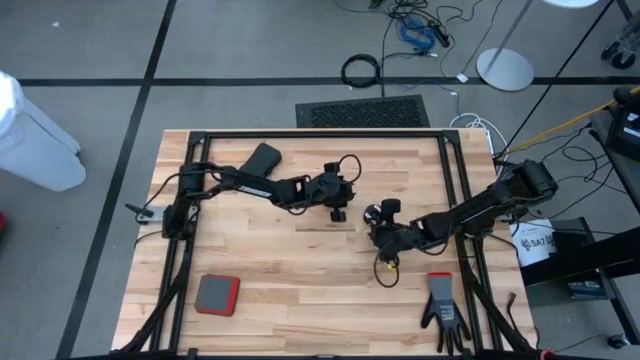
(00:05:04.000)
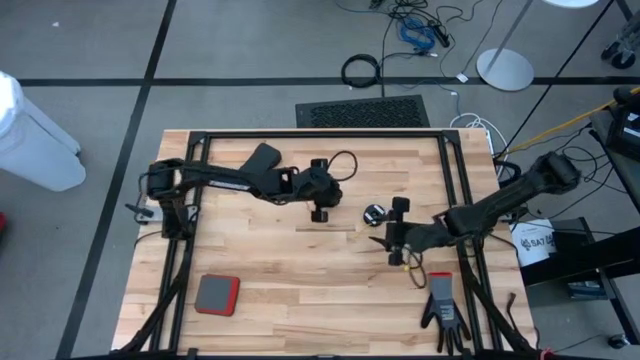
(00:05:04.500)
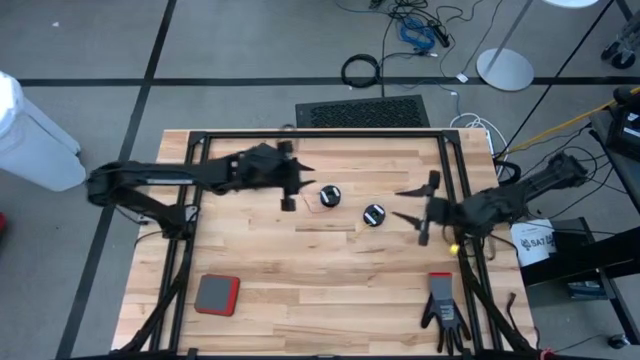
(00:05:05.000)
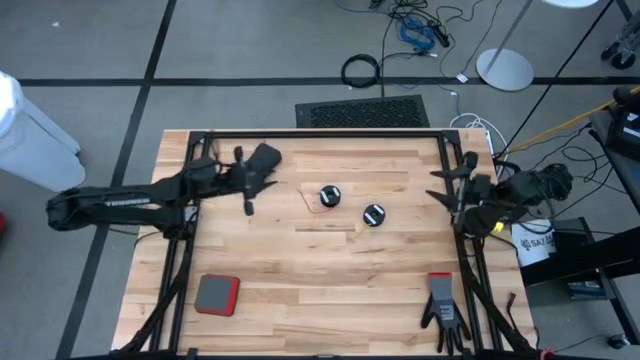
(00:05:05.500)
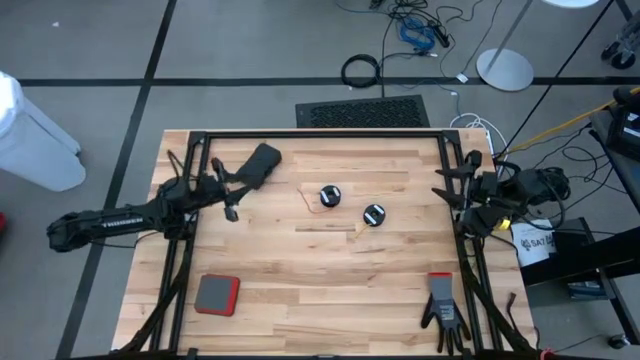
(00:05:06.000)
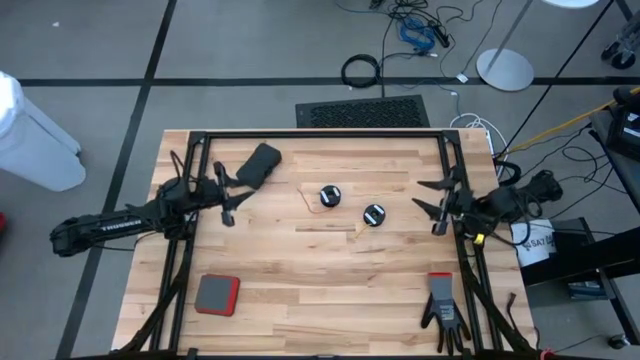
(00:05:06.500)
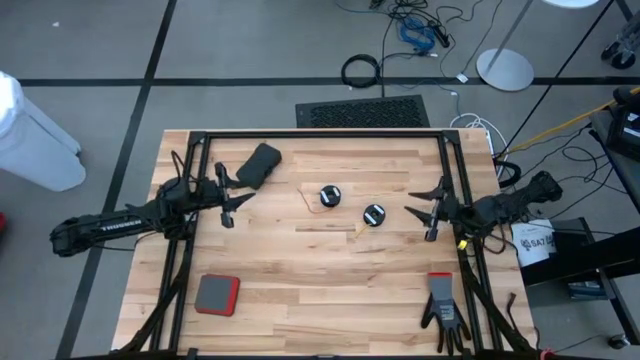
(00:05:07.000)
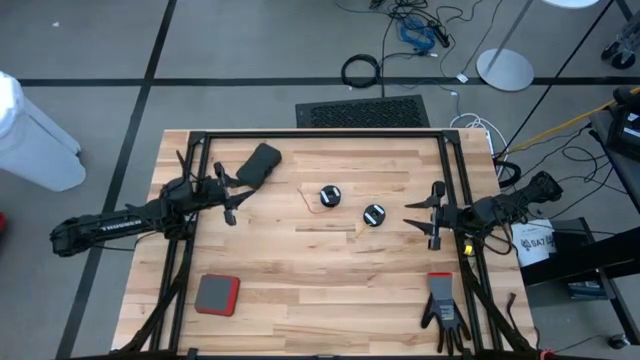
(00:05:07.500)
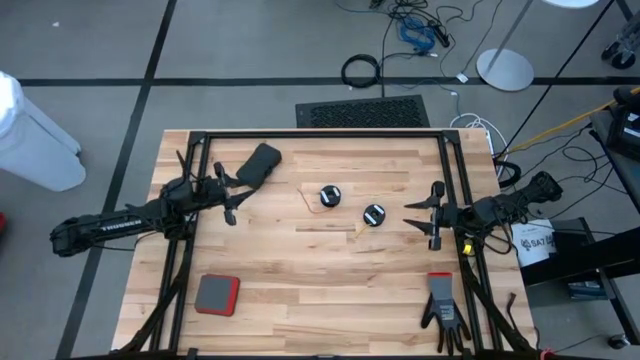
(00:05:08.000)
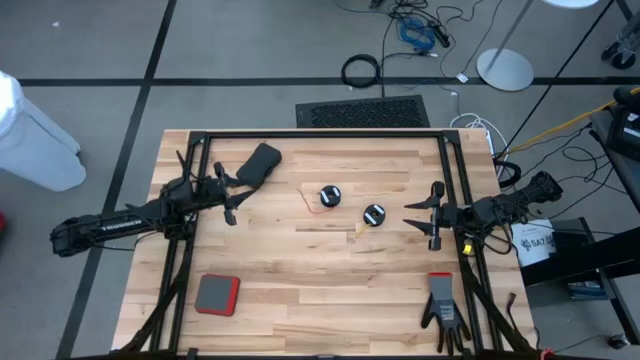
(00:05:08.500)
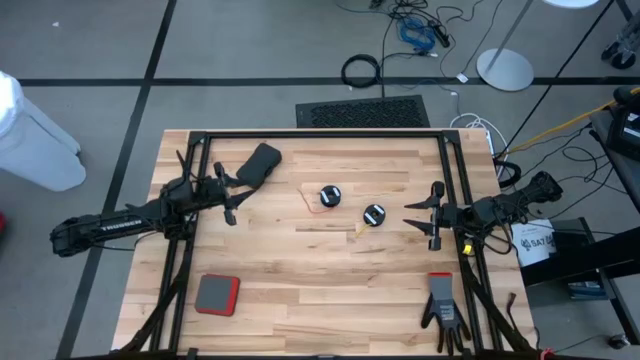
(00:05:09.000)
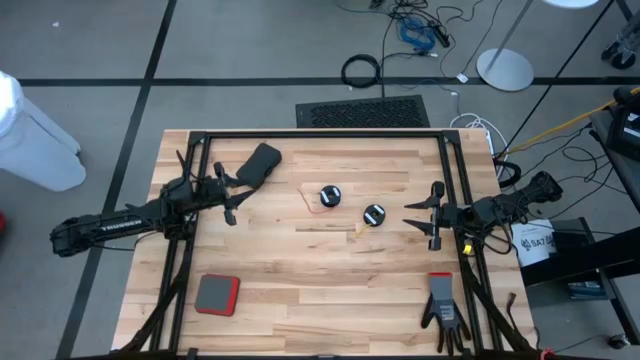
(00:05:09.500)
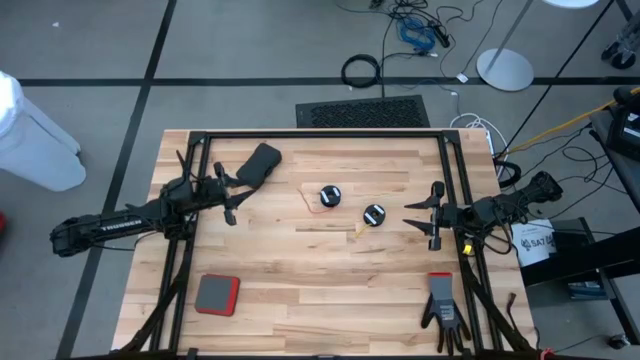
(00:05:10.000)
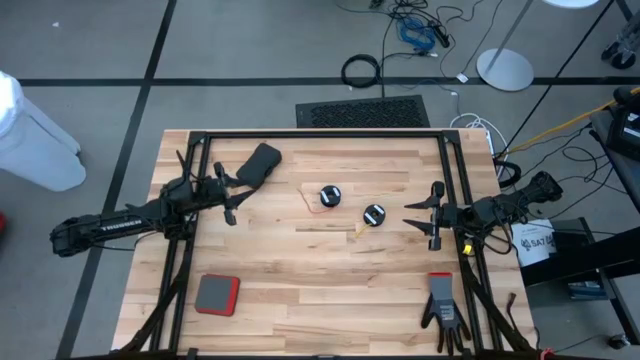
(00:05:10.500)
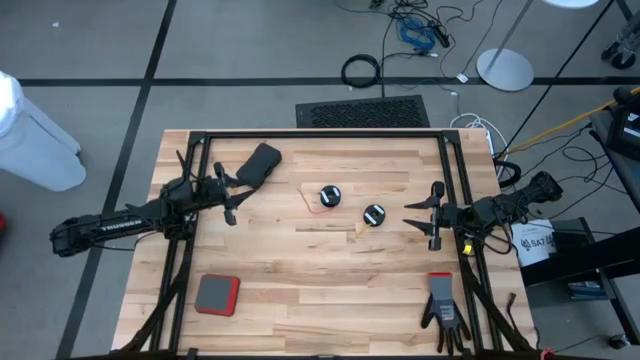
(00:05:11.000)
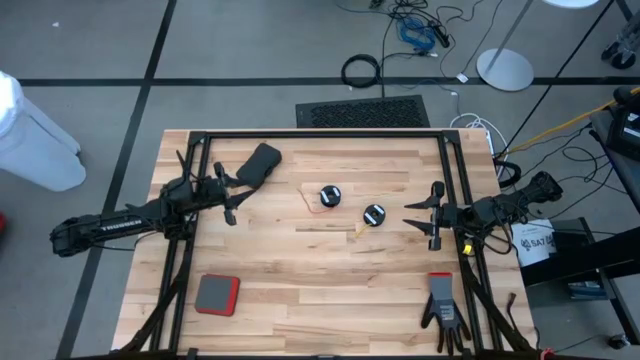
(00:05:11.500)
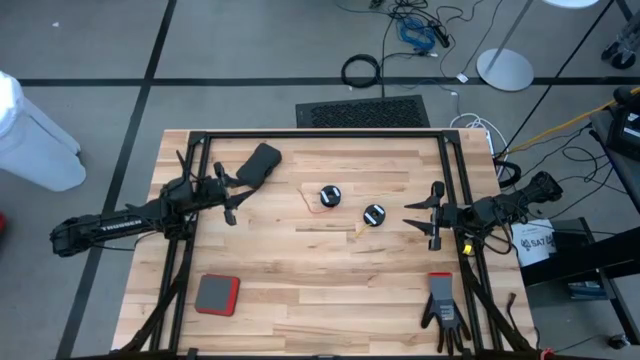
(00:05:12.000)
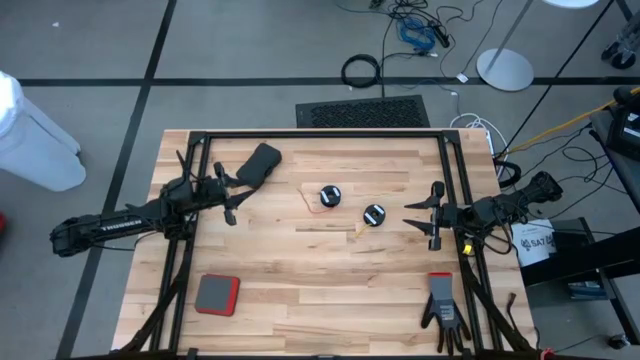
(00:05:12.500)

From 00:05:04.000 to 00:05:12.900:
Task: Coil cords
Return to Home Position

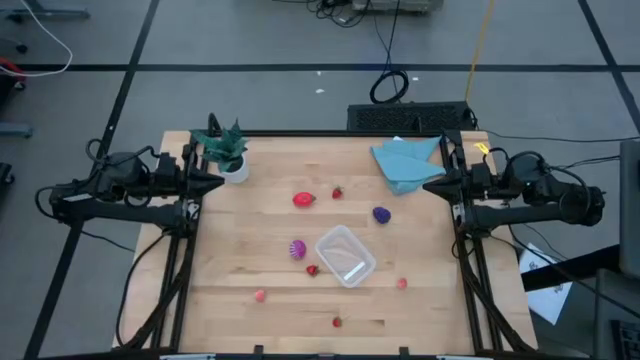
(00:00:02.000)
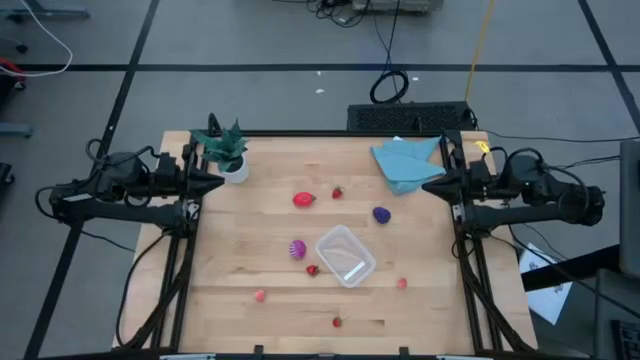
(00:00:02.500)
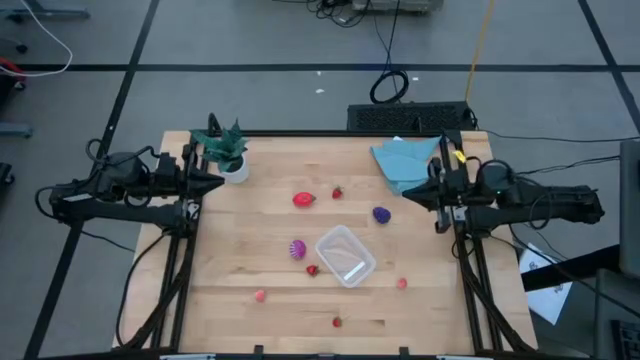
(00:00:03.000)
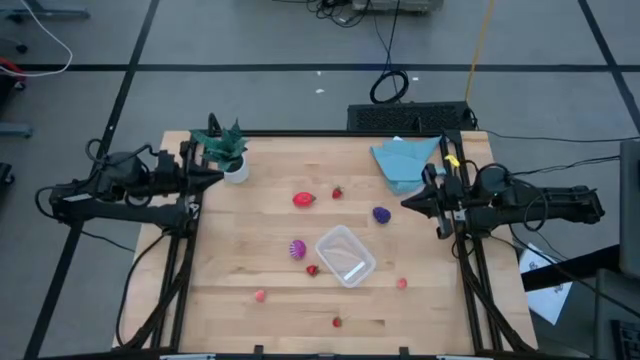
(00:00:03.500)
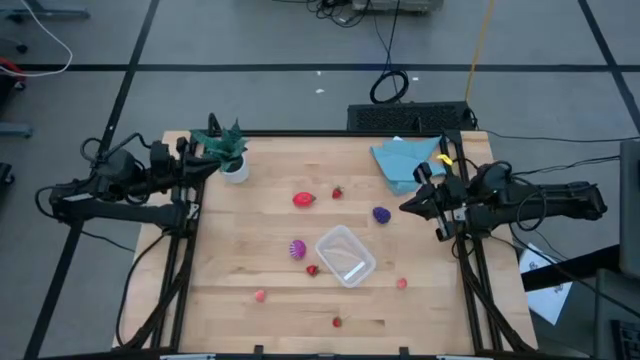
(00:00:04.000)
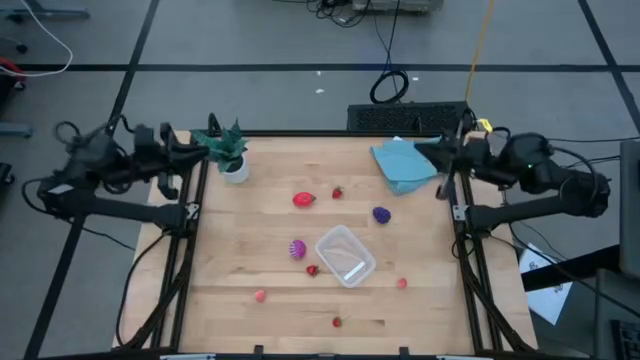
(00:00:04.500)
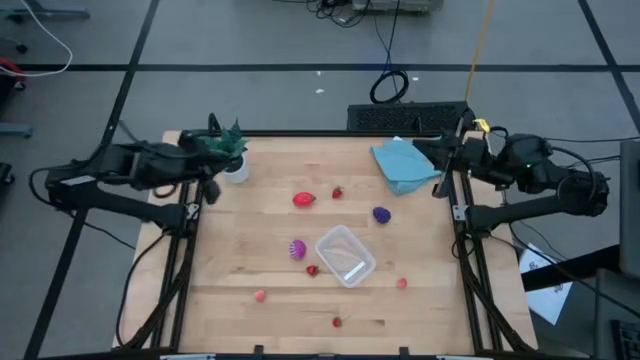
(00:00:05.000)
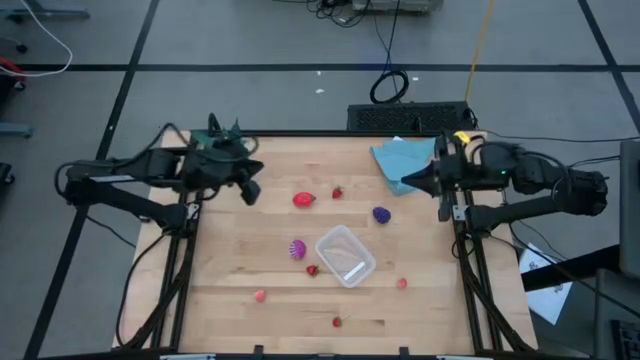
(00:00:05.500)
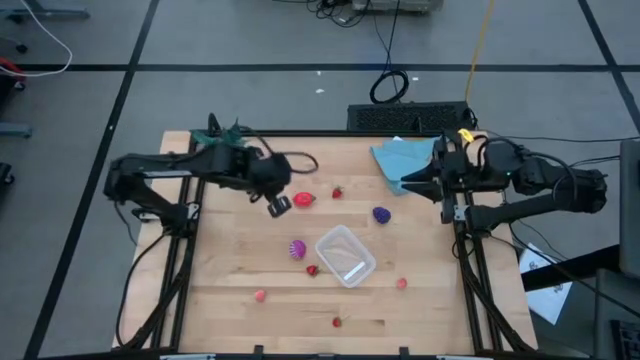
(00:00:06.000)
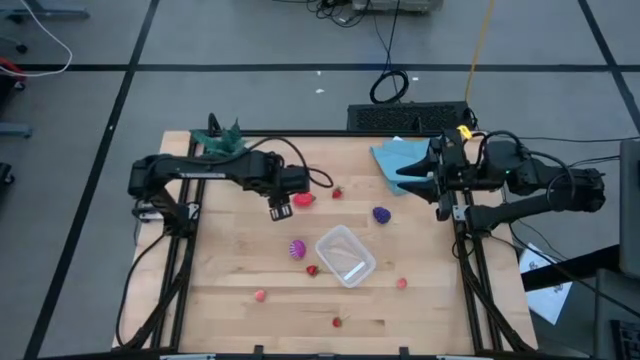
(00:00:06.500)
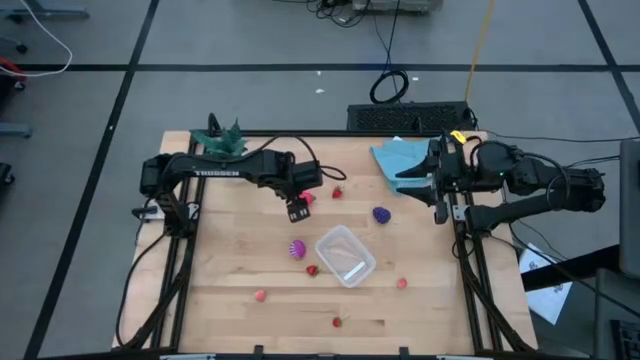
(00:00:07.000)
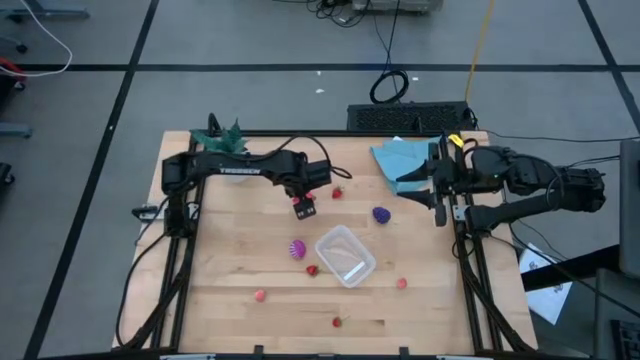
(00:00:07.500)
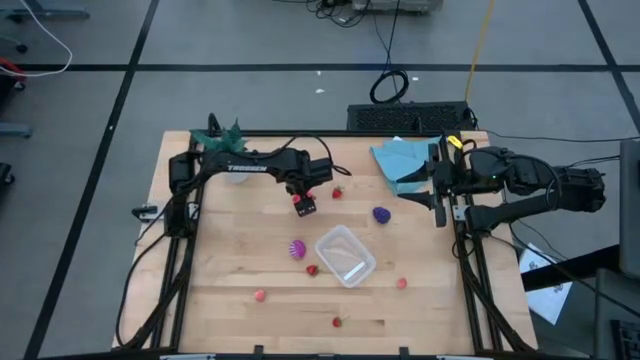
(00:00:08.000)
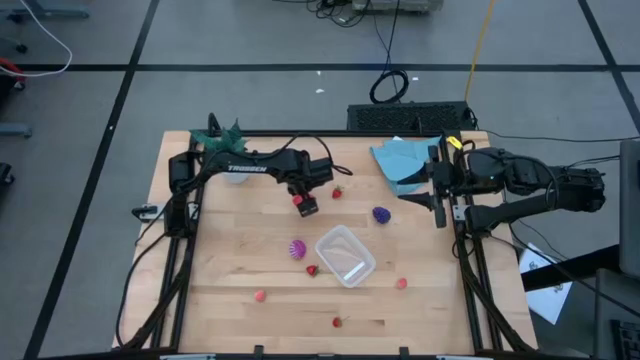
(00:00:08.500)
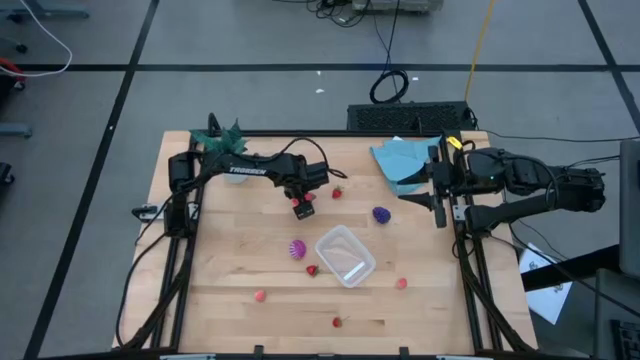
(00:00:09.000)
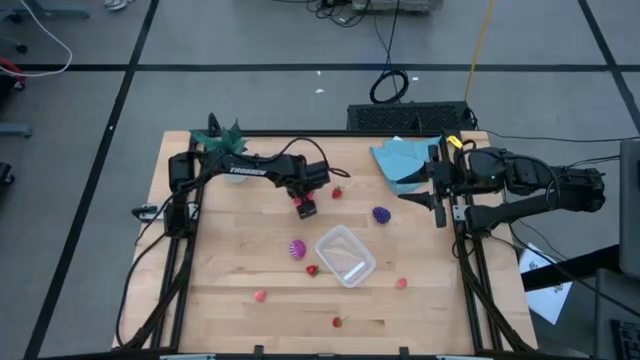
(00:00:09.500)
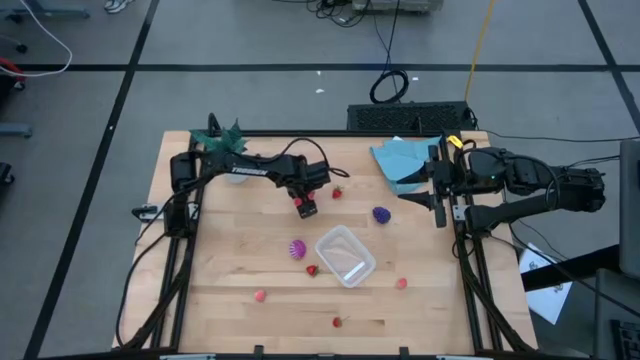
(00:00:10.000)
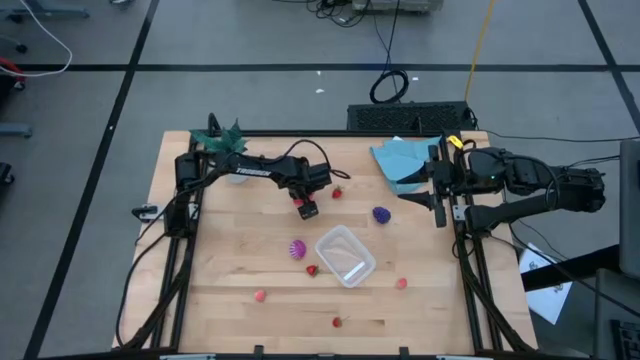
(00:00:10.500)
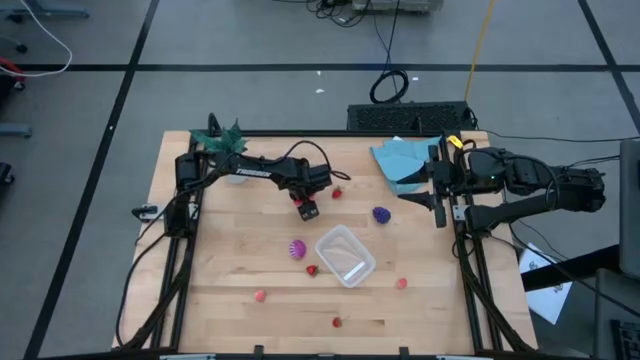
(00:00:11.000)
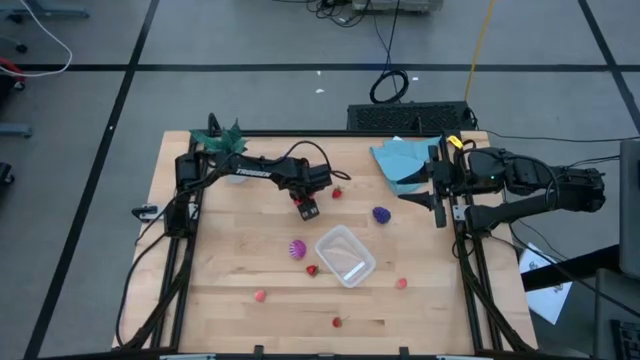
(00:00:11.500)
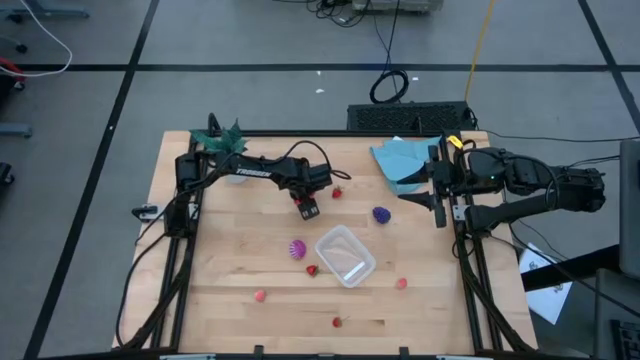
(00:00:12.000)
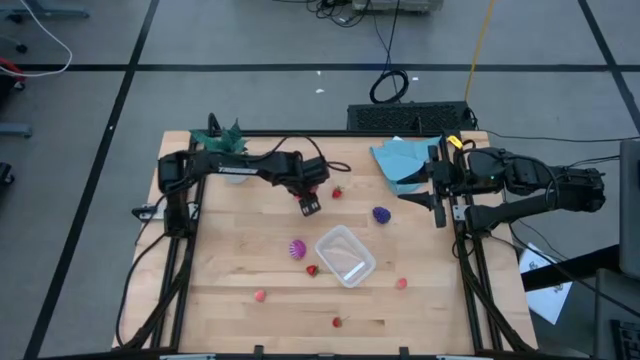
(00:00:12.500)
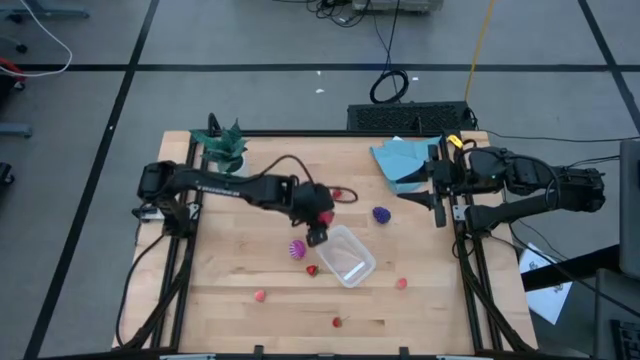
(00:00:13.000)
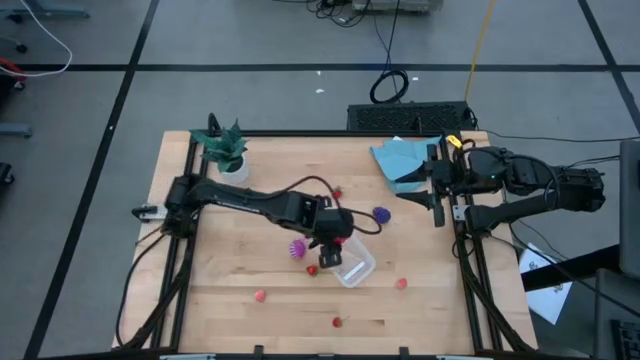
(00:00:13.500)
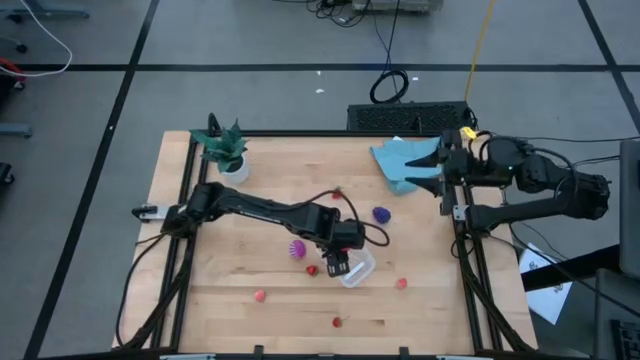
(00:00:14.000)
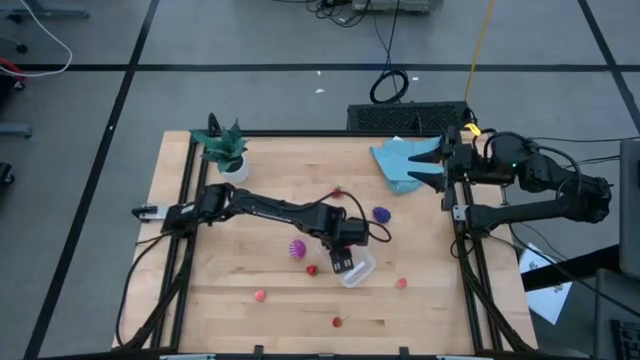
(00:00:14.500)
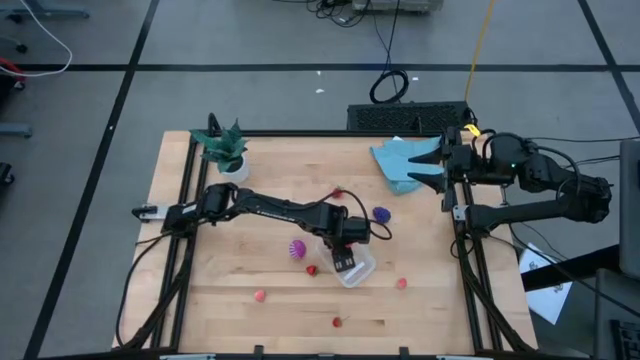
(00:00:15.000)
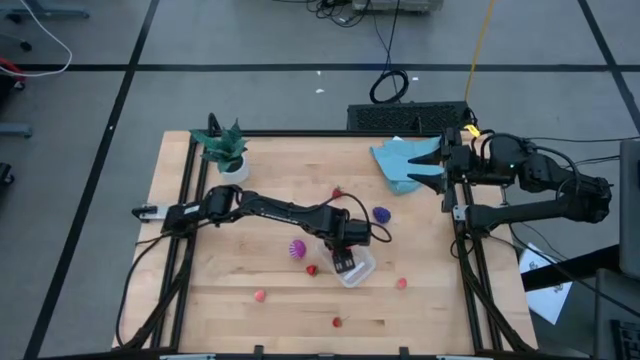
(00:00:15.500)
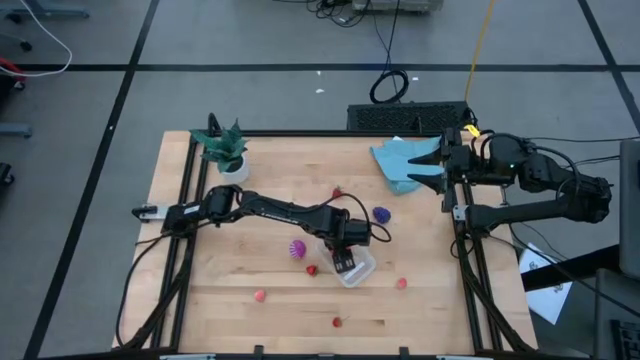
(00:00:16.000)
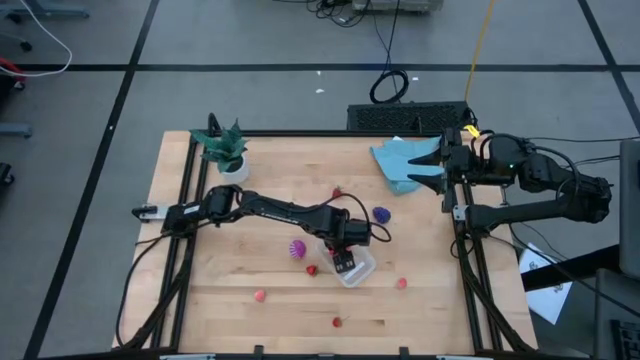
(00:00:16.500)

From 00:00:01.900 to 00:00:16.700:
Task: Pick and placing Produce into tupperware
Put the dragon fruit into the transparent container
